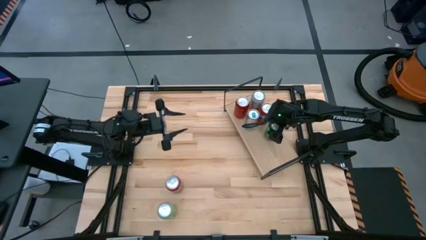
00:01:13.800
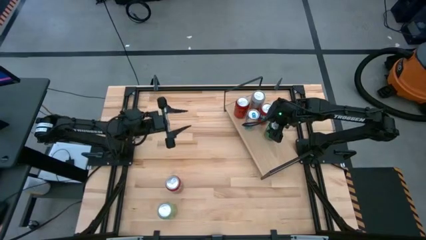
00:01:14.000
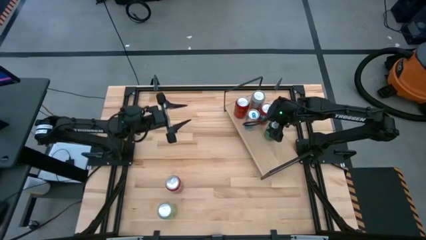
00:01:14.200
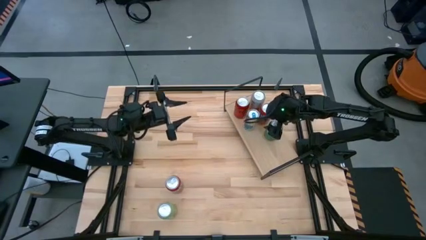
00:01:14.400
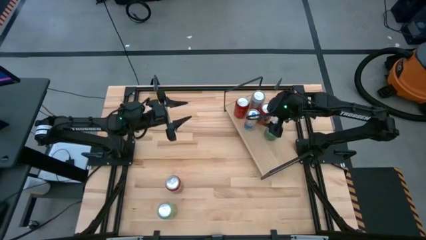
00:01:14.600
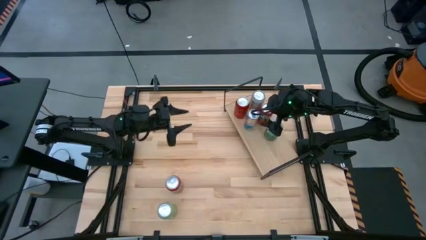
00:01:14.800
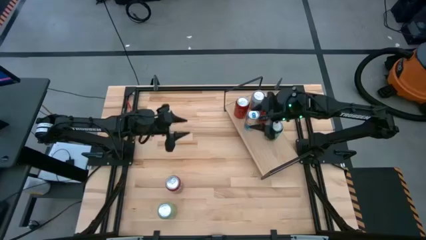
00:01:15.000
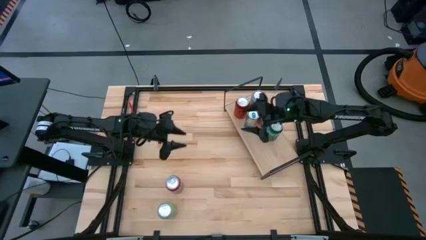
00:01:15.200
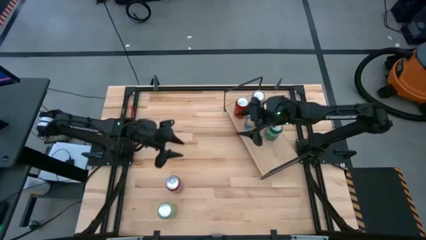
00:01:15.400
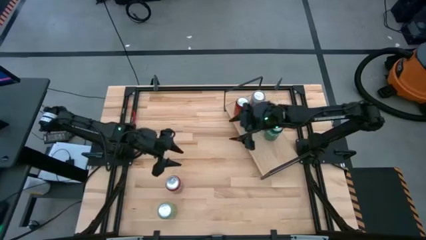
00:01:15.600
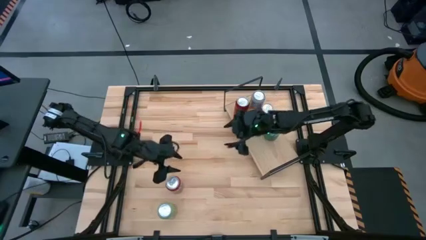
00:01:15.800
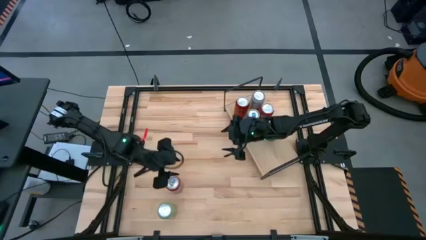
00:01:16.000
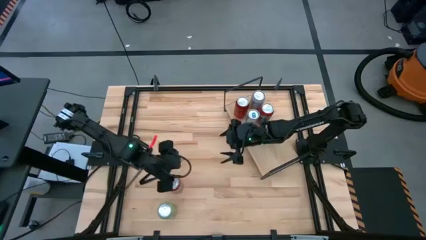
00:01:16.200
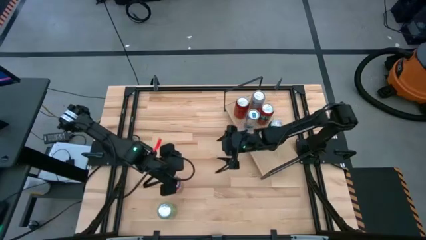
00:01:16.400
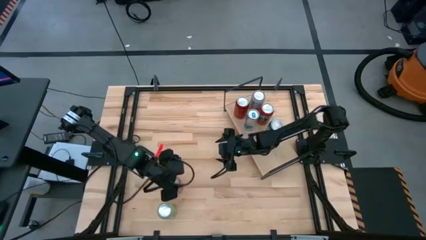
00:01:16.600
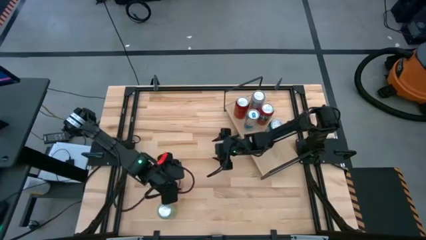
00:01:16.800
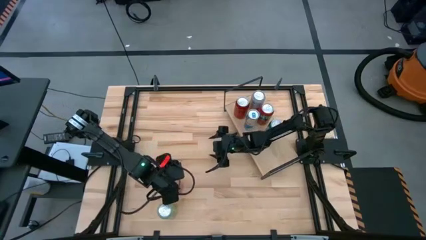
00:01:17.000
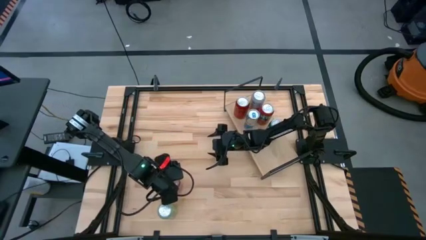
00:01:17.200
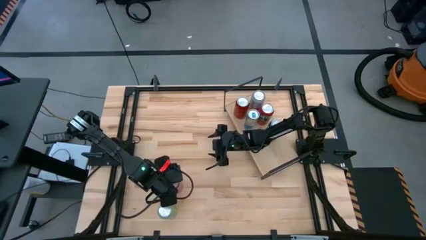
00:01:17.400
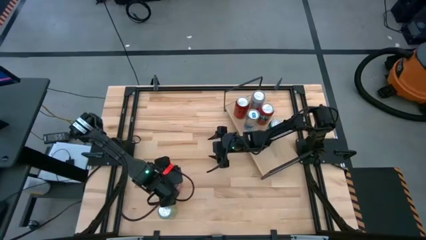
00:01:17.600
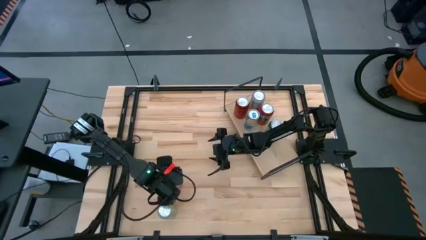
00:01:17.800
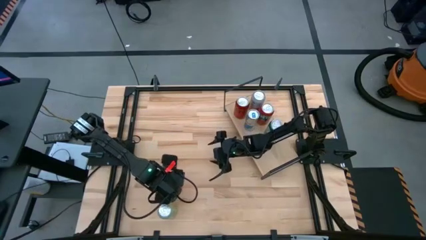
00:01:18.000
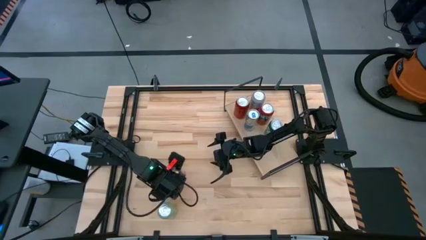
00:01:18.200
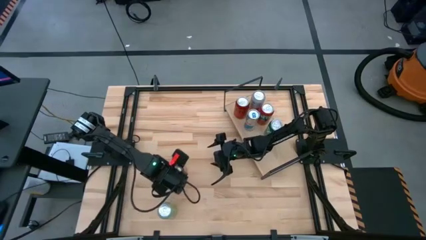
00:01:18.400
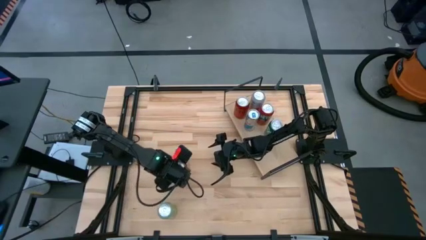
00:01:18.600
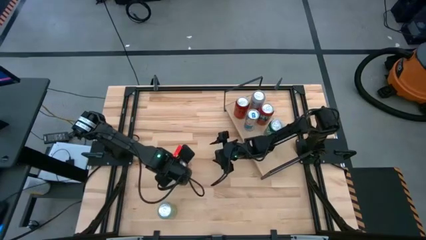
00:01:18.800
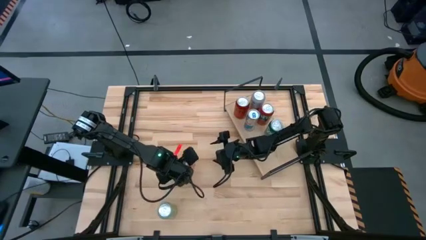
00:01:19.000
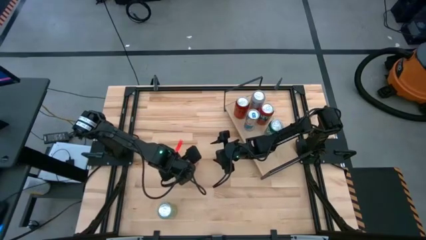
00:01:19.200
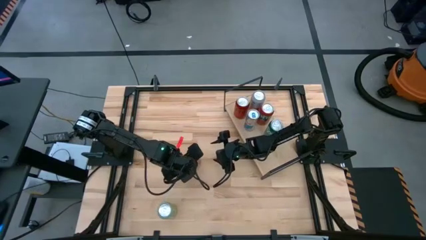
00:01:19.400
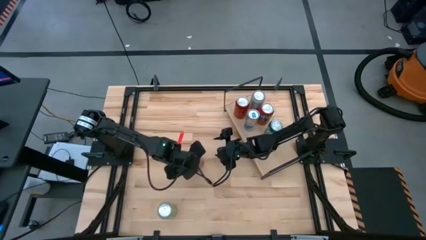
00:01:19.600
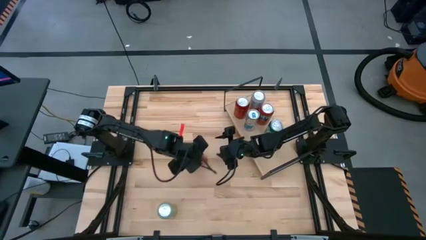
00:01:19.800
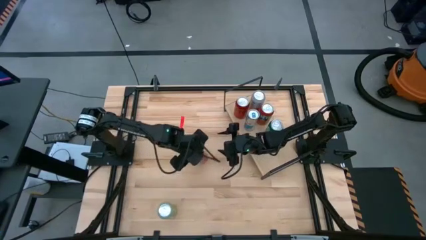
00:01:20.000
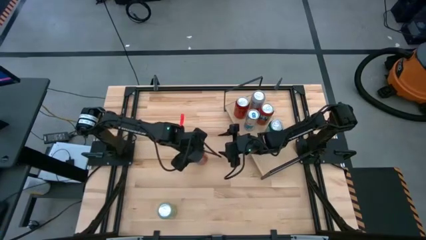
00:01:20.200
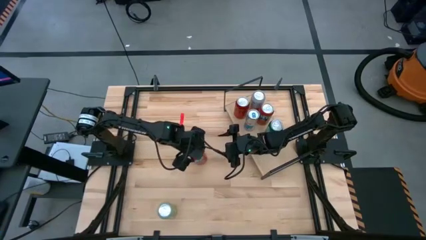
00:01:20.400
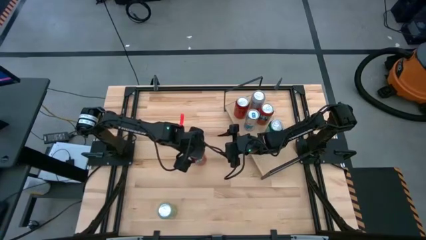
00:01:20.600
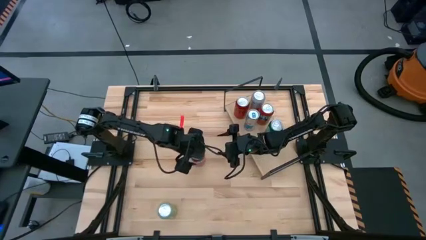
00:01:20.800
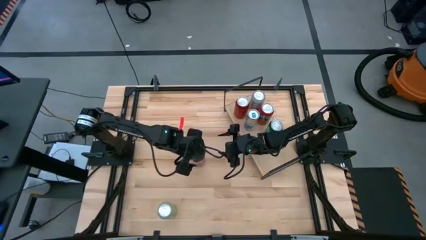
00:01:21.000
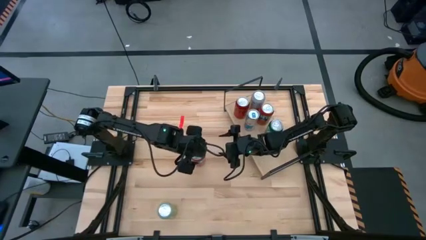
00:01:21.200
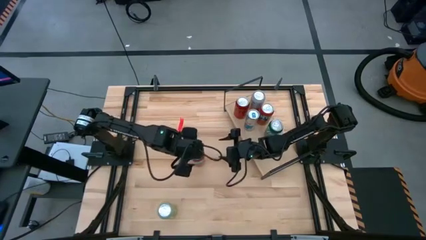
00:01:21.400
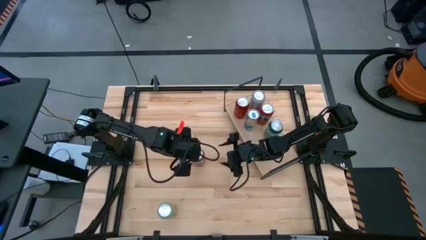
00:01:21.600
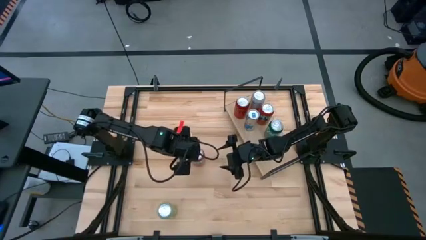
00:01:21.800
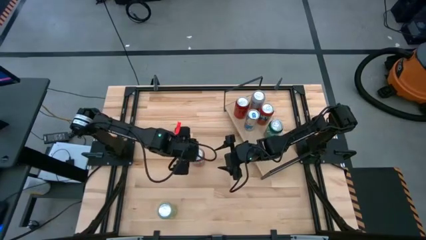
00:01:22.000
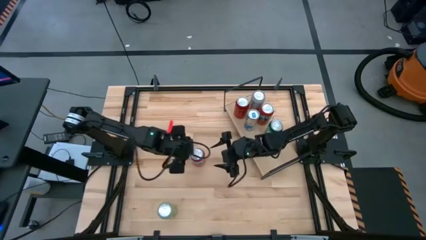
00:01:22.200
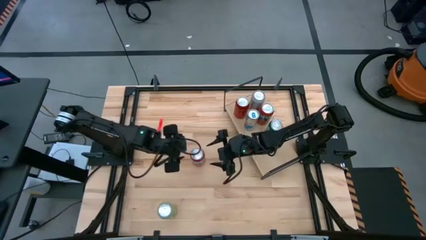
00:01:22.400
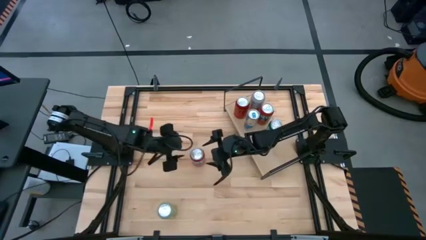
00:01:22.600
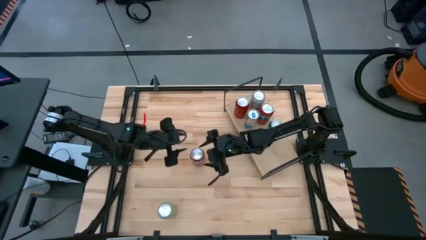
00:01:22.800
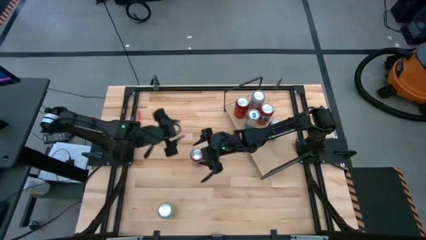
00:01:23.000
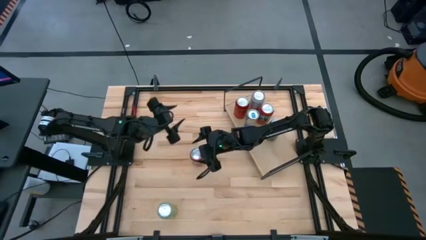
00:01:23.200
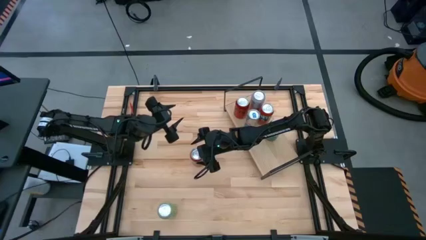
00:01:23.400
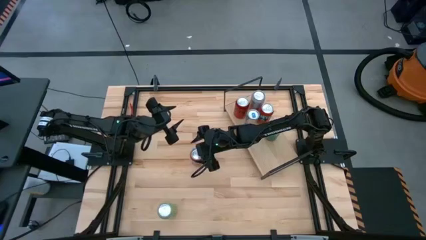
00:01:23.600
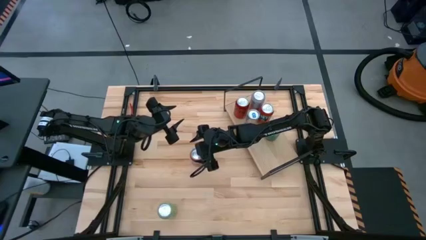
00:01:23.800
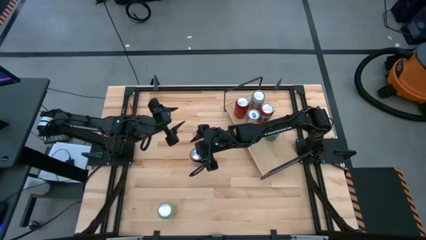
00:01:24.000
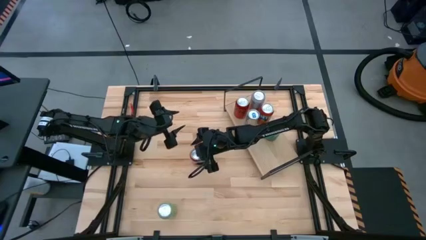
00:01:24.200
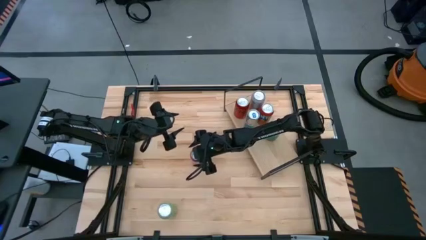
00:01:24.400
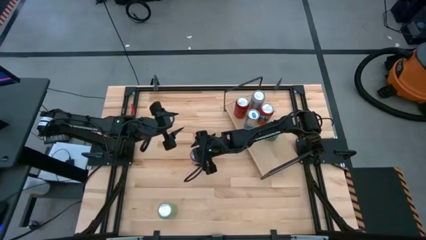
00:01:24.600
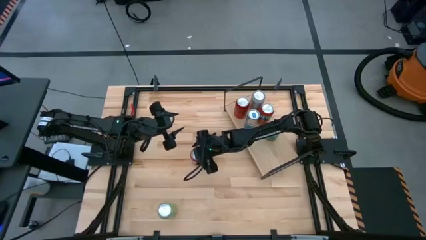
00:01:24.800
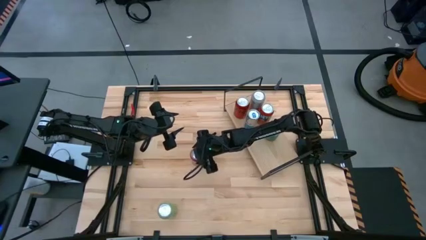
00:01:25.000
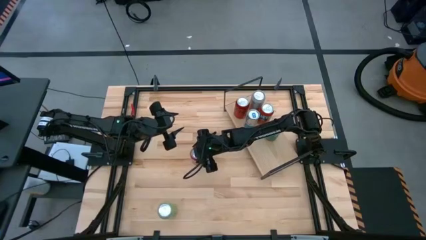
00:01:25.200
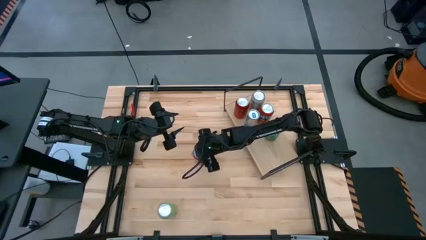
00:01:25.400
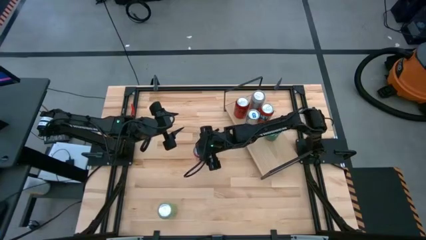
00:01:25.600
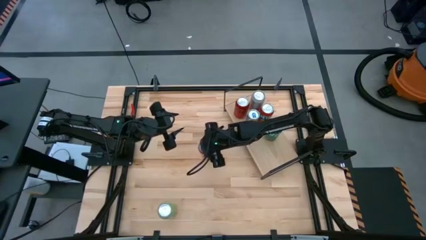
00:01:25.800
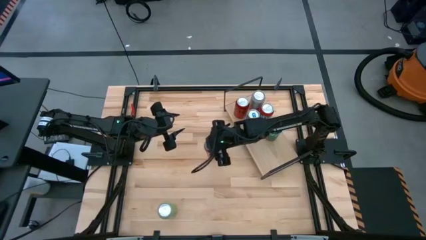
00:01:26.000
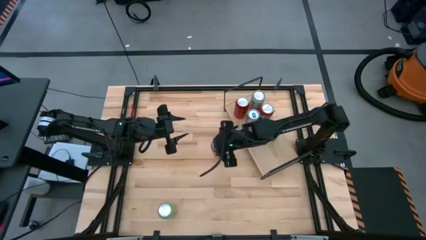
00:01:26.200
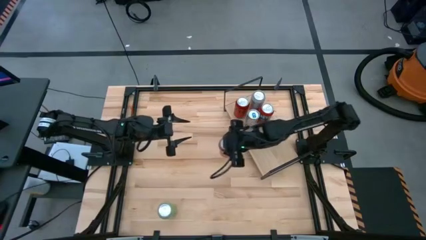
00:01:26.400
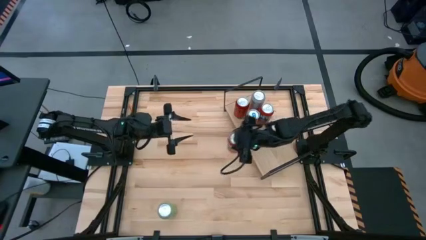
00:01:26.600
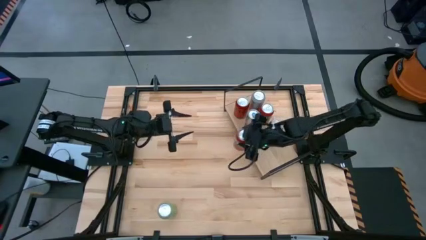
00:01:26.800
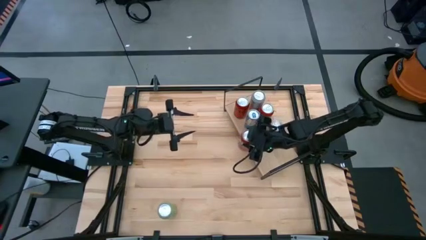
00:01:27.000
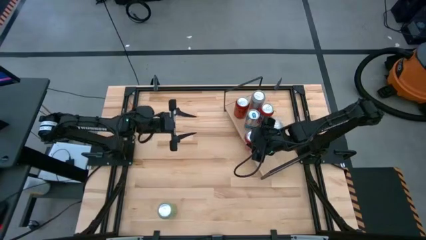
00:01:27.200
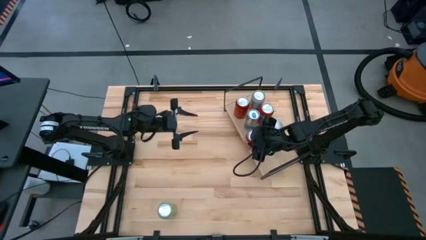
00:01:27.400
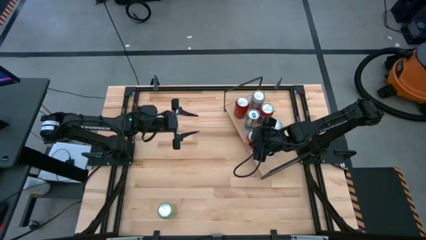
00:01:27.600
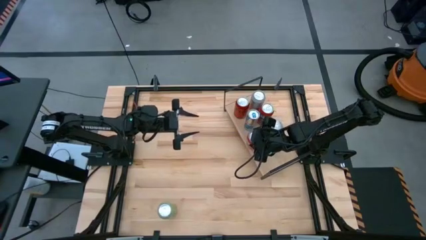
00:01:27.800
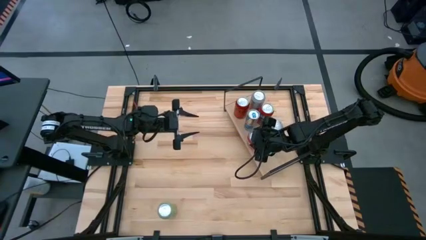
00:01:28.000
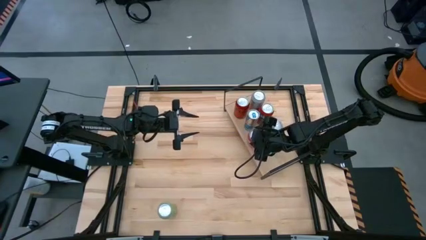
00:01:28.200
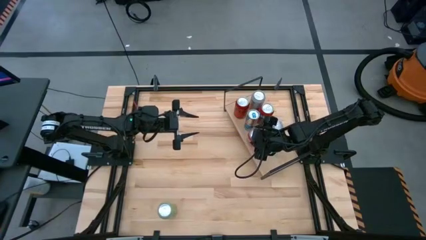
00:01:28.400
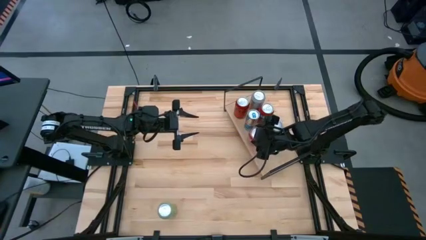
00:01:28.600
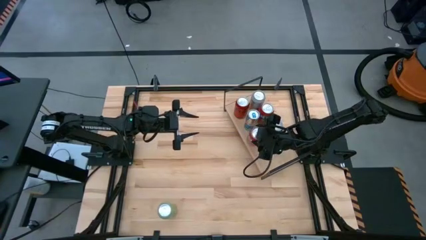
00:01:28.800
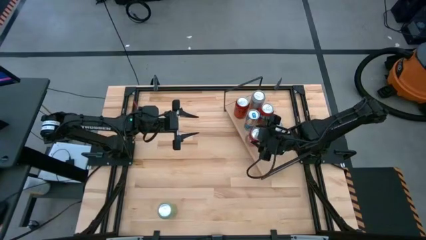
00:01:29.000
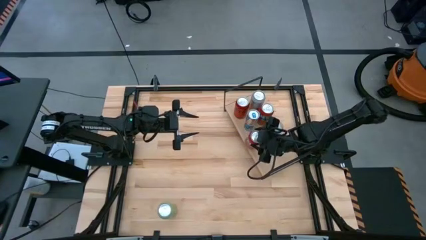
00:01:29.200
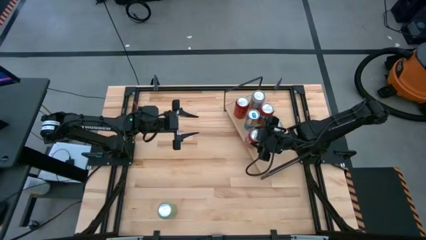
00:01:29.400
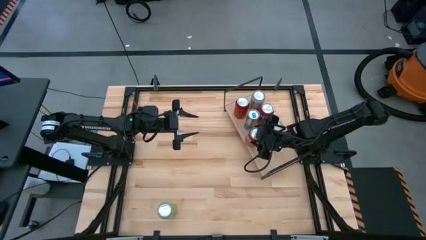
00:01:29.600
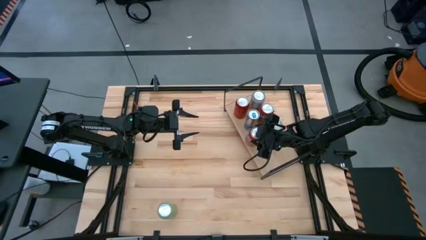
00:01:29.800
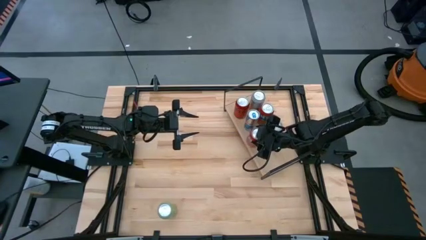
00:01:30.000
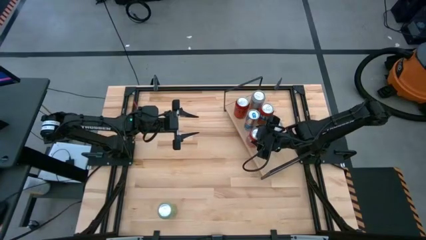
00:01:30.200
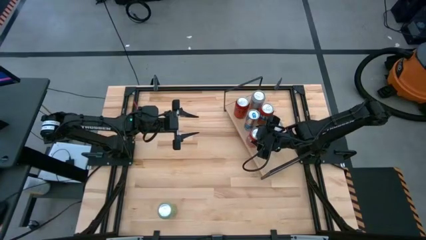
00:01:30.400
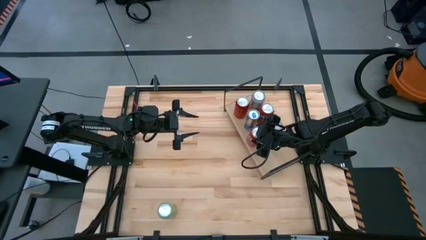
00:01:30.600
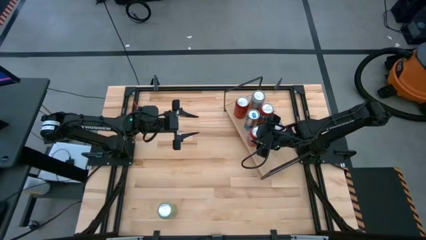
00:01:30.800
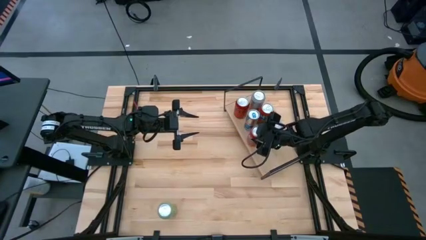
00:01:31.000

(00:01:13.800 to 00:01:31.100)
Task: Place canned beverage on shelf
Put the orange soda can on the shelf, aligned with the other green soda can
